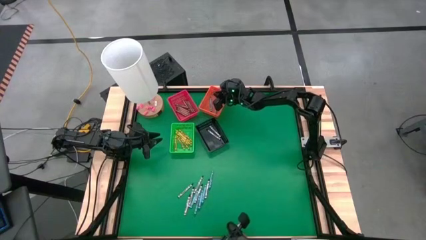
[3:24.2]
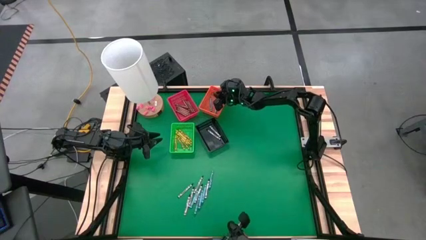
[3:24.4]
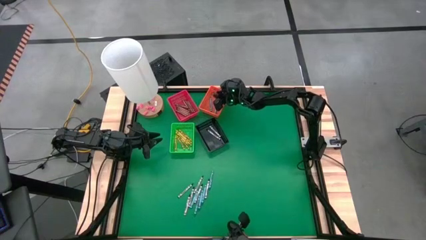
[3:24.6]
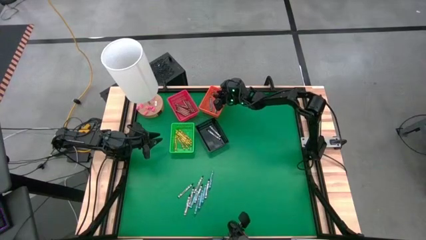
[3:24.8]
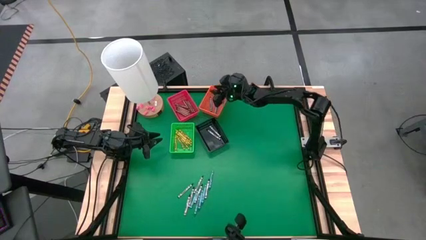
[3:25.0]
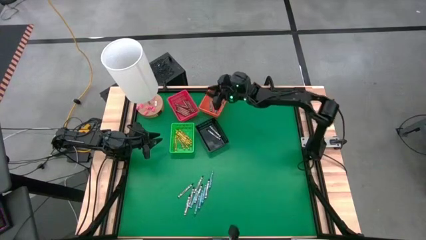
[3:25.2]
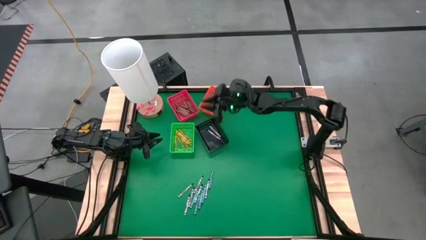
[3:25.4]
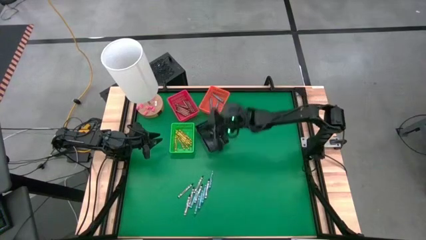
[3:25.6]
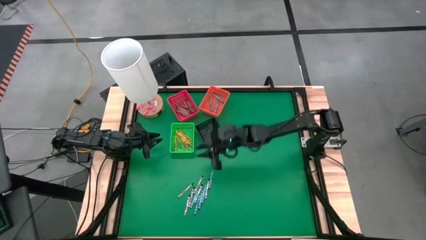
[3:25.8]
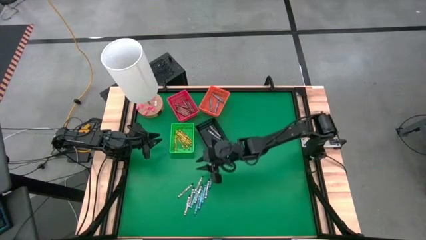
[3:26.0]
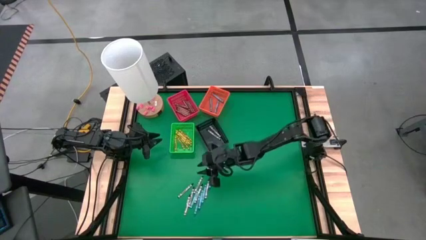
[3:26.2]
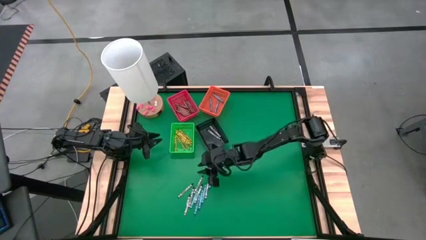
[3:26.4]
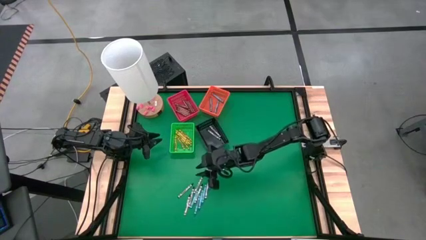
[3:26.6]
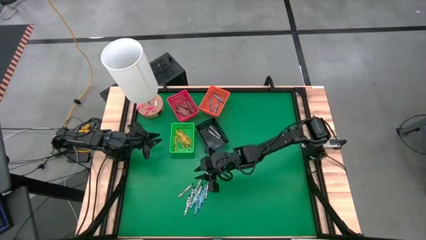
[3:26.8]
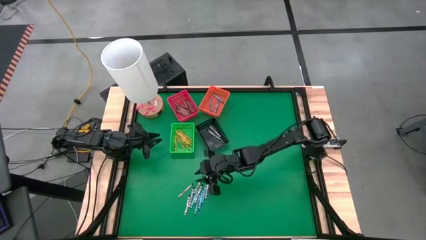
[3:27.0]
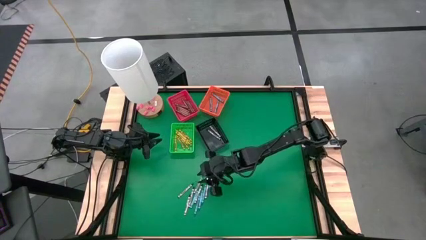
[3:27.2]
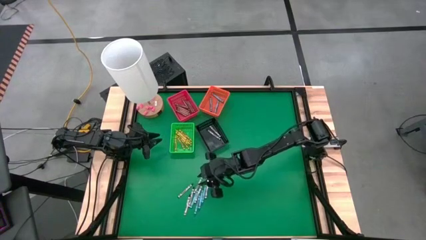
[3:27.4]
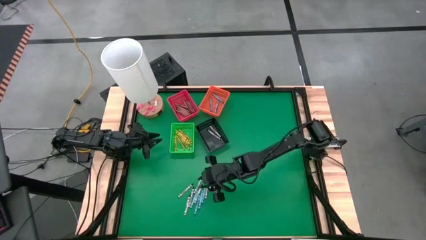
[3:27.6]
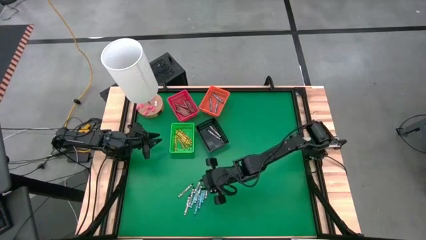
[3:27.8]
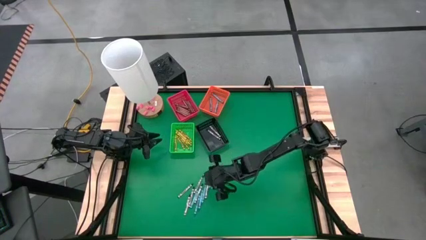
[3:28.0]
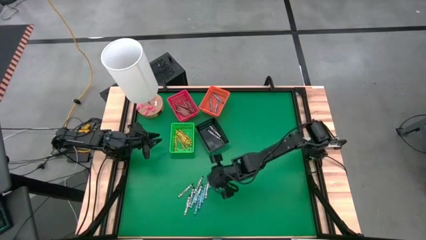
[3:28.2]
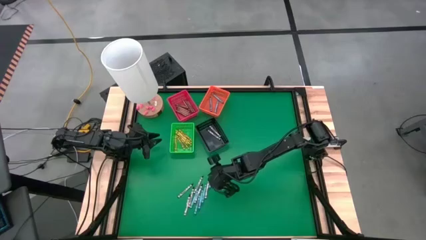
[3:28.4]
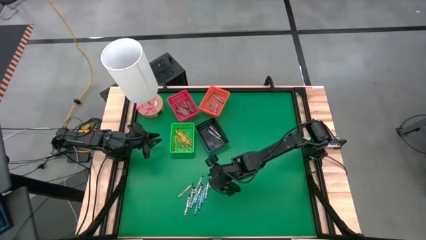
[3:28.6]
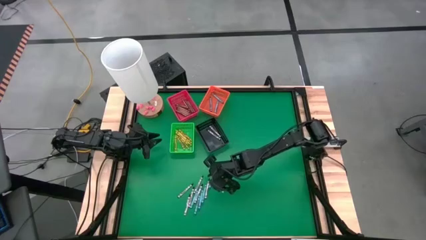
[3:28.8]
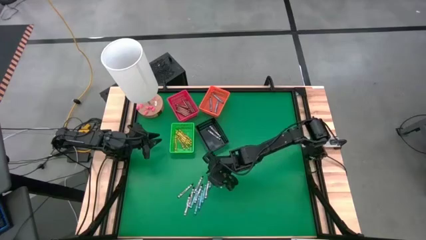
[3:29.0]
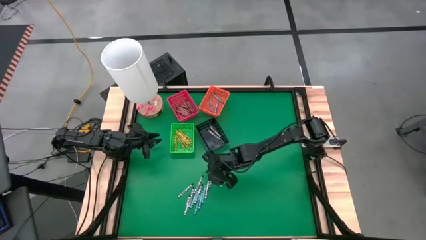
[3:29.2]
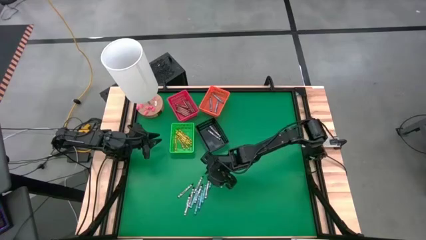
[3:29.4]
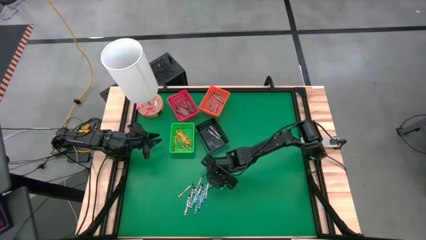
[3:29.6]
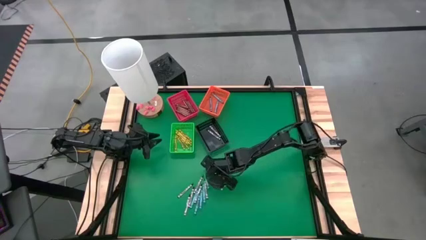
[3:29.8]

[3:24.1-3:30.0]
Task: Sort crayons
Put the blue crayon into the orange bin

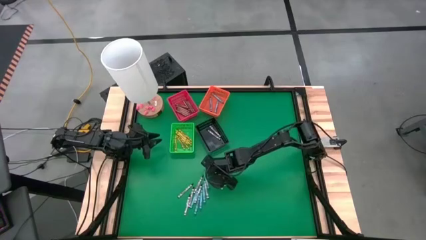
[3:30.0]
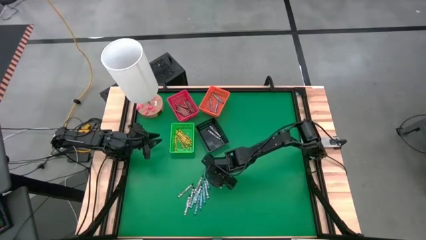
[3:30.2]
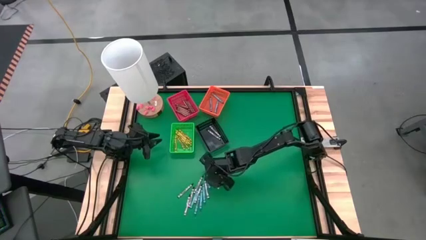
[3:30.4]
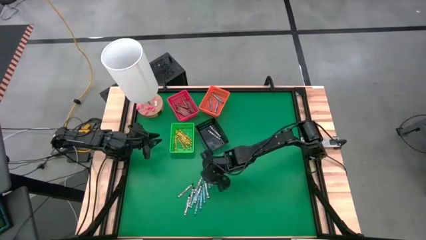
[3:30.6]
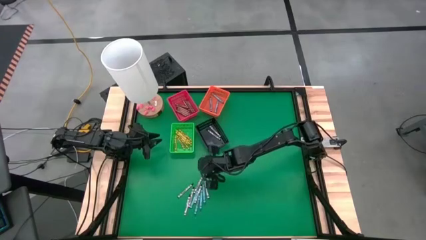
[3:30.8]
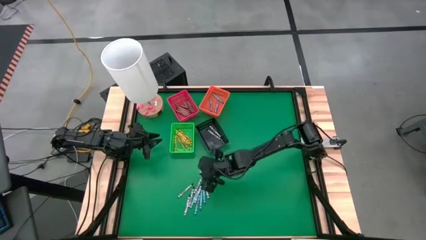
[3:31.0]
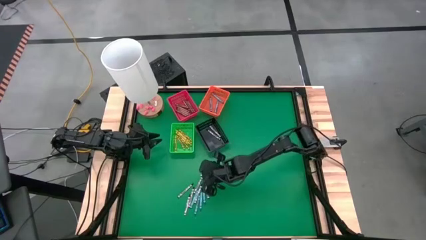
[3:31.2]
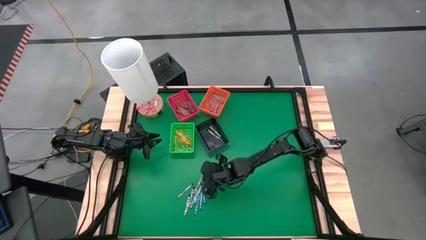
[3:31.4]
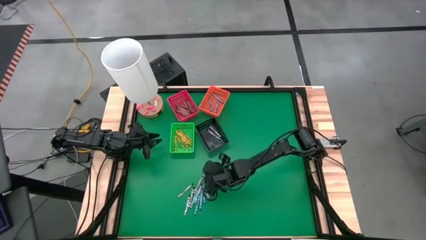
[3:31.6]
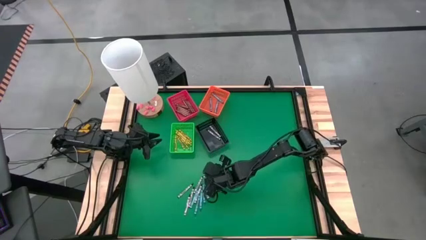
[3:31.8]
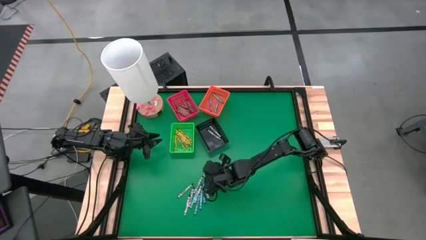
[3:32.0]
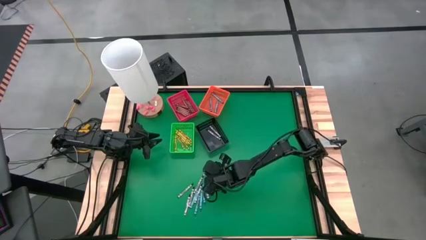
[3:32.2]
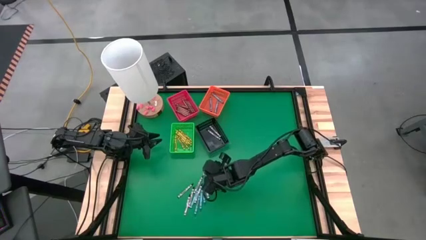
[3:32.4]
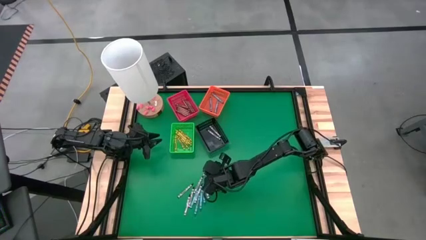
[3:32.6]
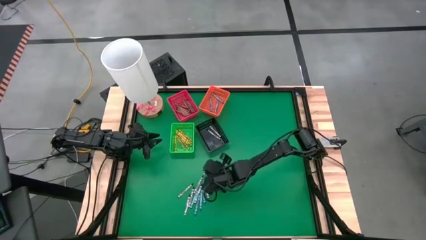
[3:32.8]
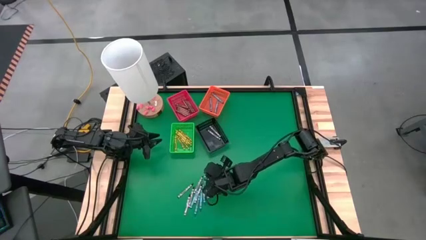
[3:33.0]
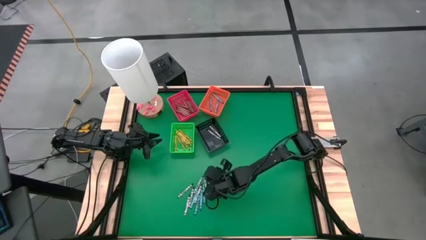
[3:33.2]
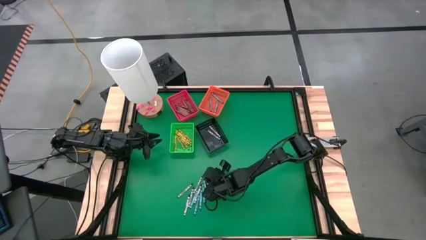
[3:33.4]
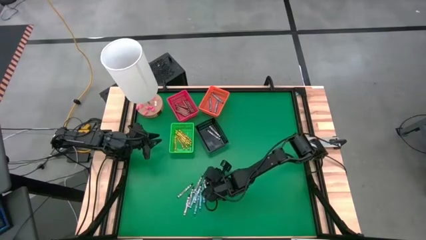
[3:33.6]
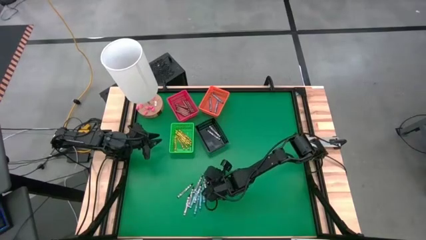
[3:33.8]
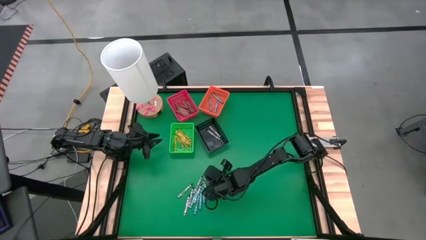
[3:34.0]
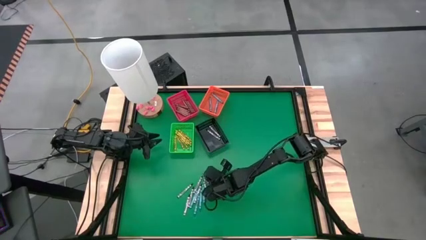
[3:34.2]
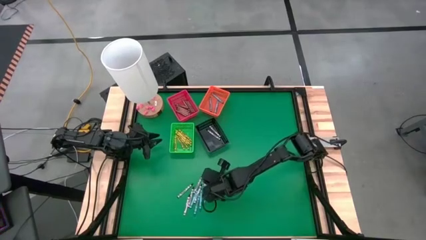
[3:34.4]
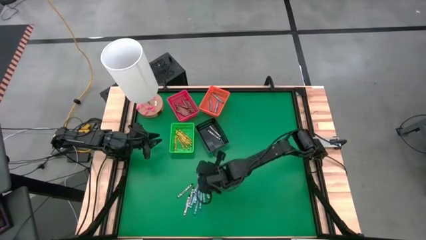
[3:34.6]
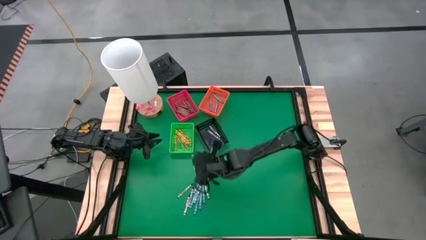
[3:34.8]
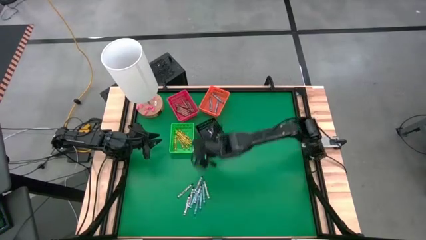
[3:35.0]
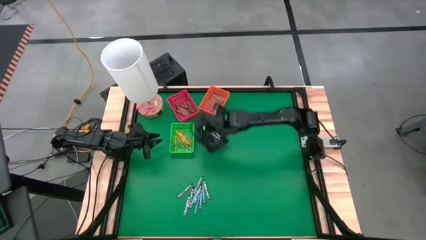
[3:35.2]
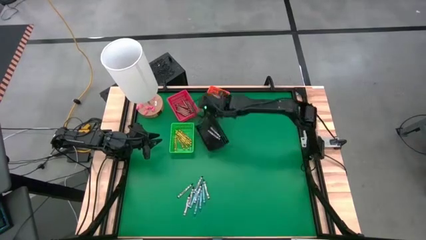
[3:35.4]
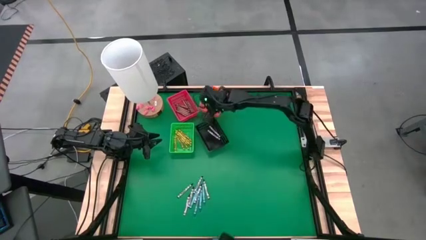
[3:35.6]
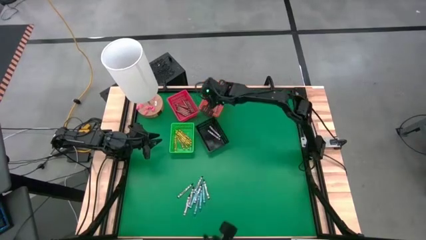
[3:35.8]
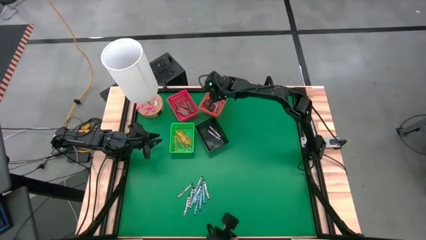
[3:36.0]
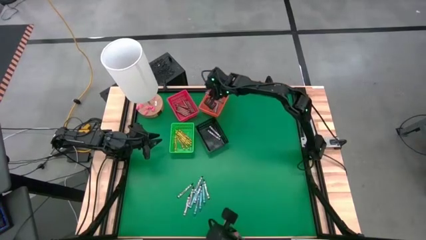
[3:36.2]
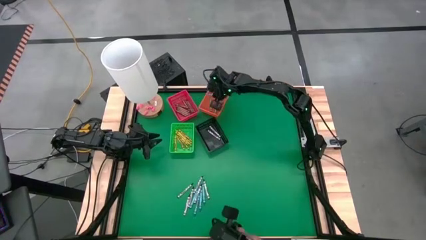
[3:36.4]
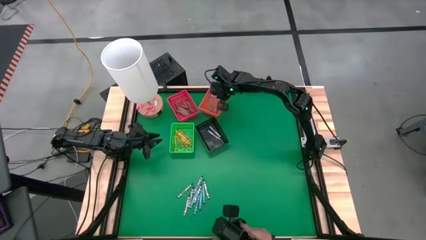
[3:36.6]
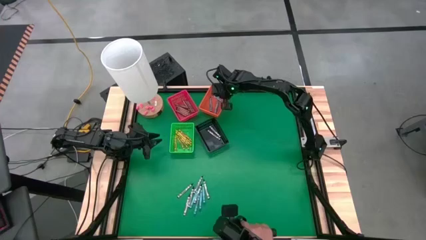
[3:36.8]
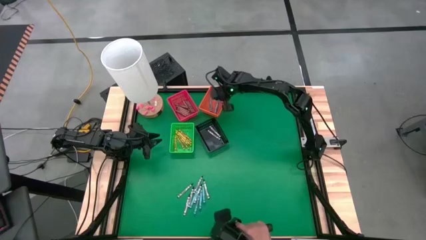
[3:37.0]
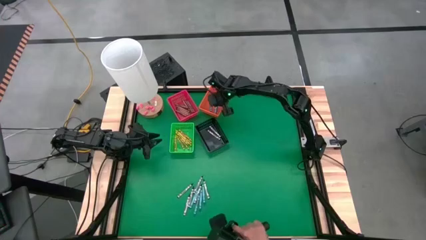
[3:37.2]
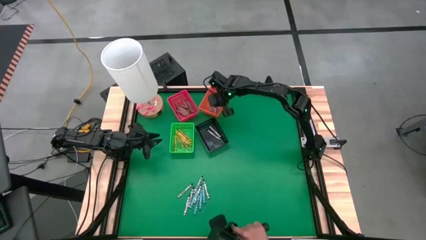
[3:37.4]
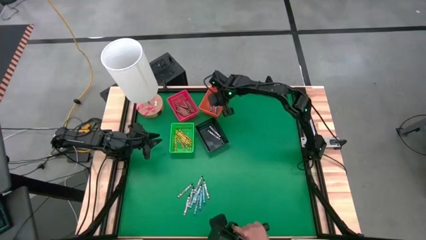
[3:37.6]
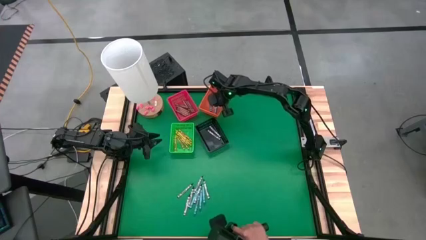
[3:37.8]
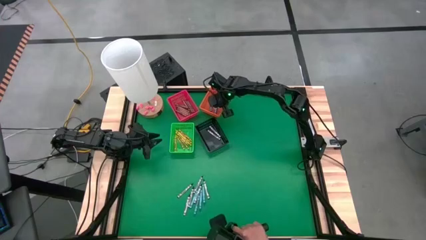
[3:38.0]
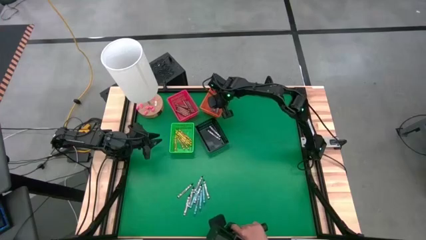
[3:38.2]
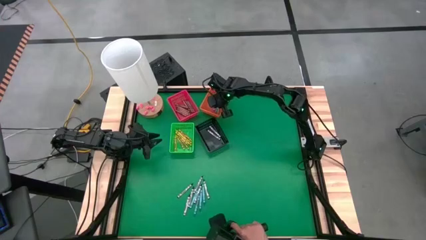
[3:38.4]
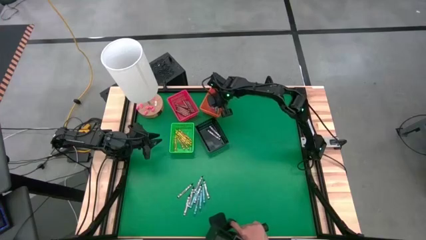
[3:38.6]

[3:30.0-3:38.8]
Put the blue crayon into the orange bin
